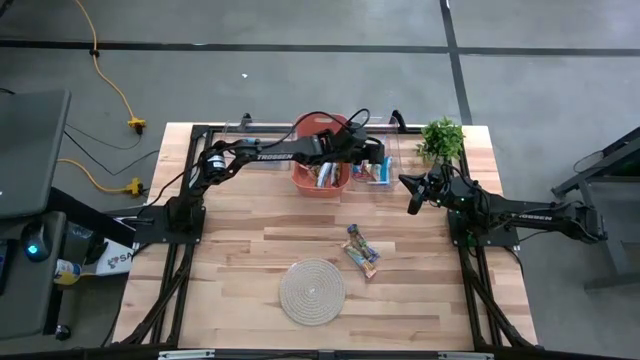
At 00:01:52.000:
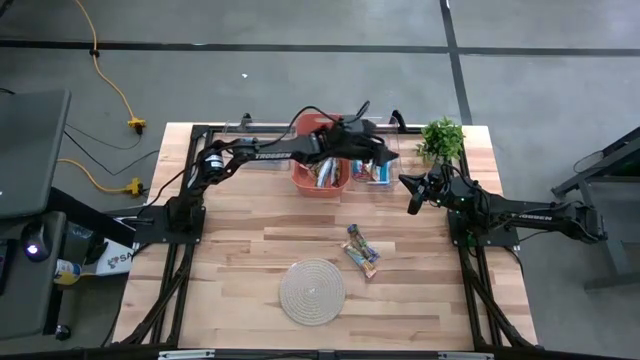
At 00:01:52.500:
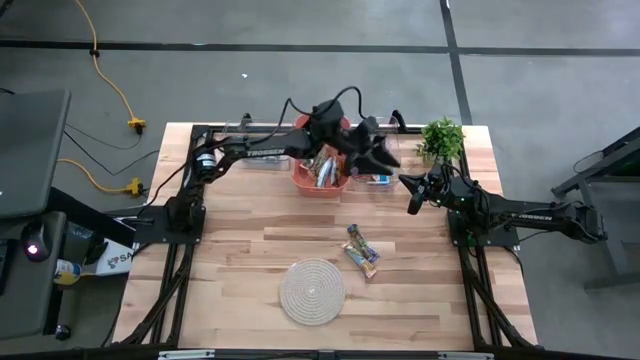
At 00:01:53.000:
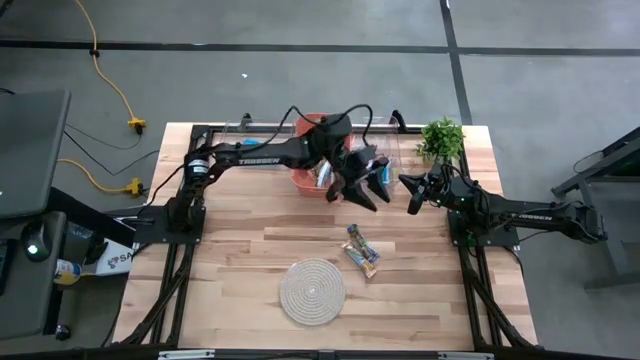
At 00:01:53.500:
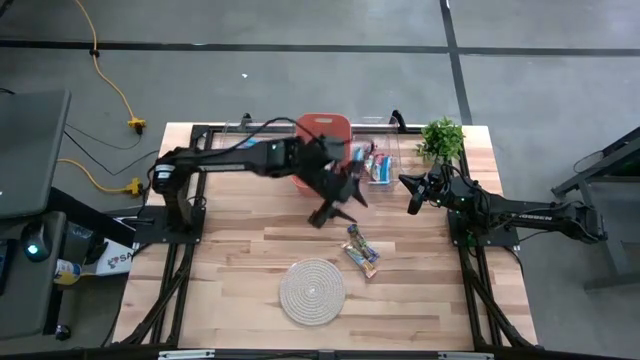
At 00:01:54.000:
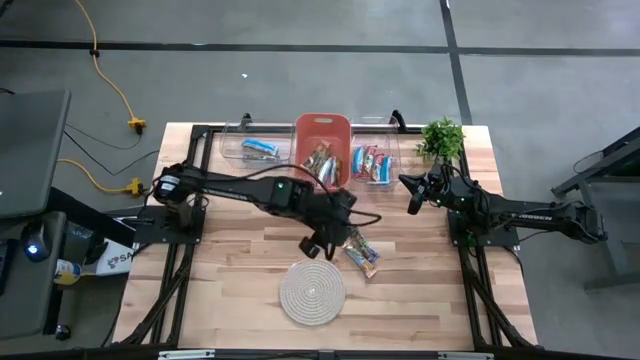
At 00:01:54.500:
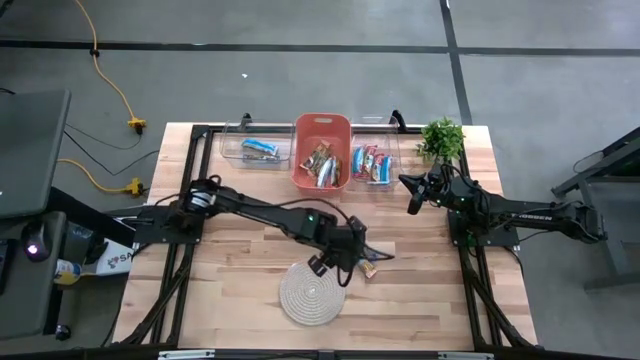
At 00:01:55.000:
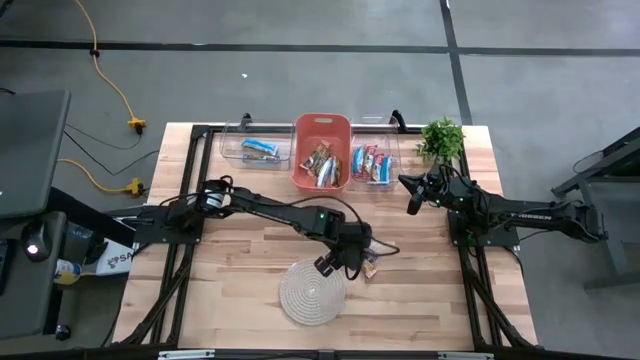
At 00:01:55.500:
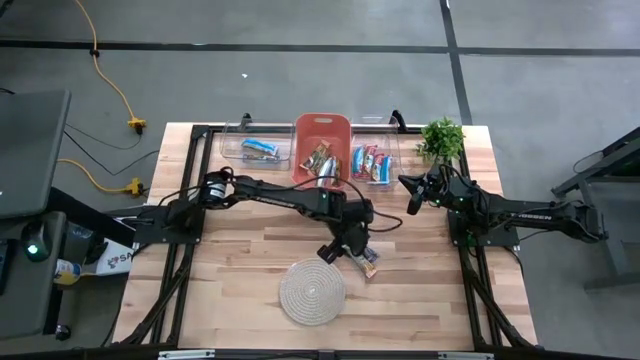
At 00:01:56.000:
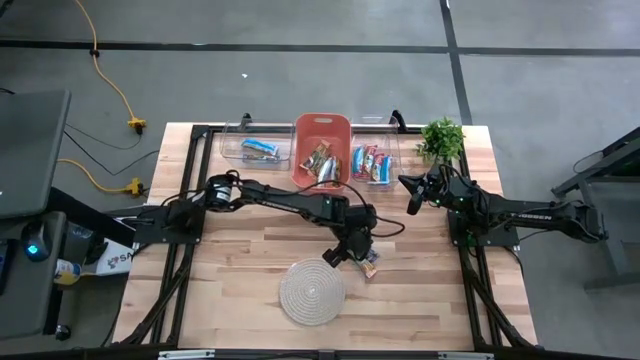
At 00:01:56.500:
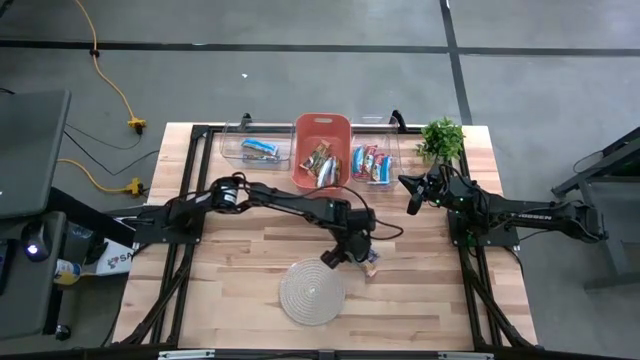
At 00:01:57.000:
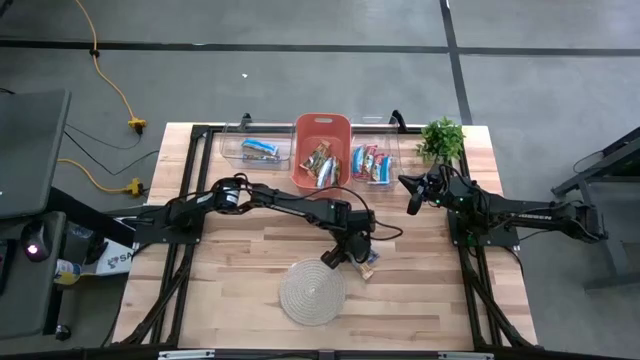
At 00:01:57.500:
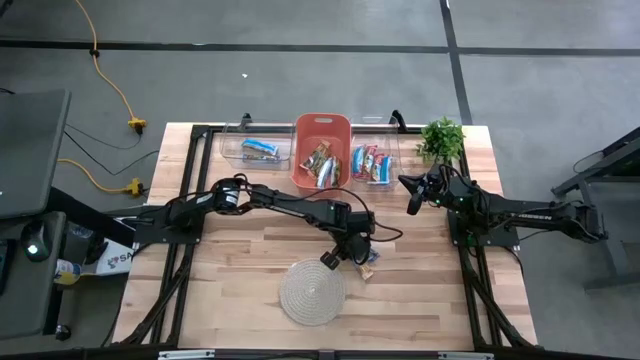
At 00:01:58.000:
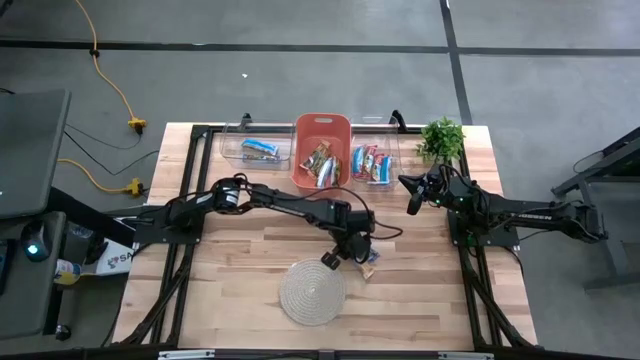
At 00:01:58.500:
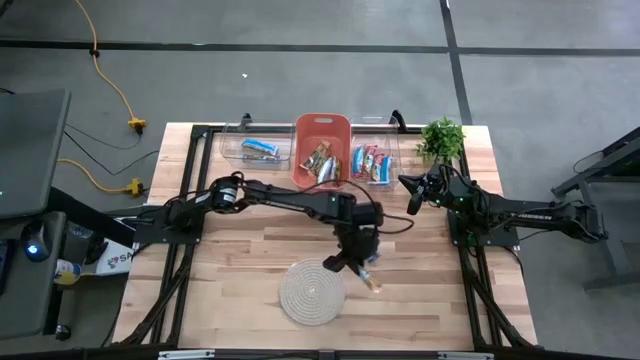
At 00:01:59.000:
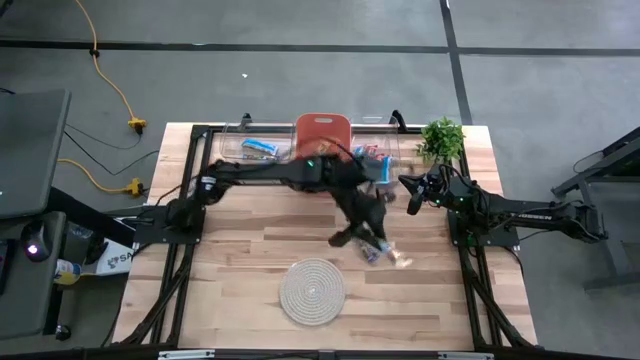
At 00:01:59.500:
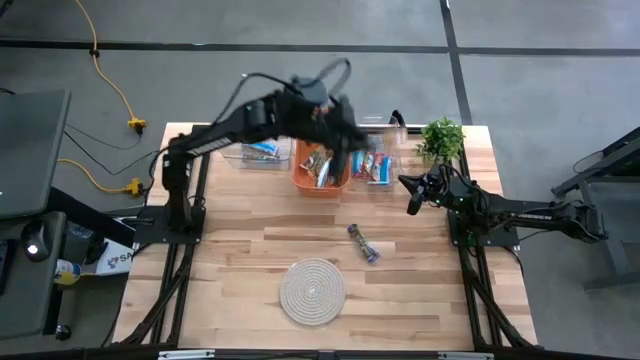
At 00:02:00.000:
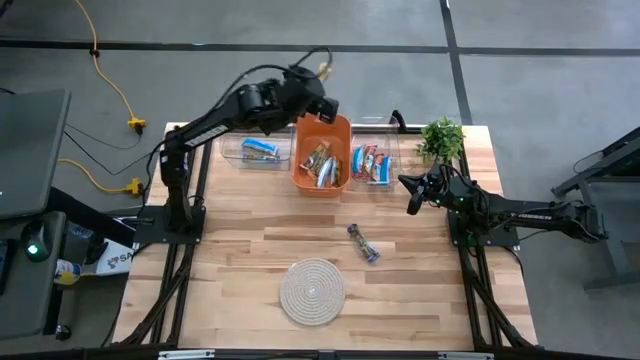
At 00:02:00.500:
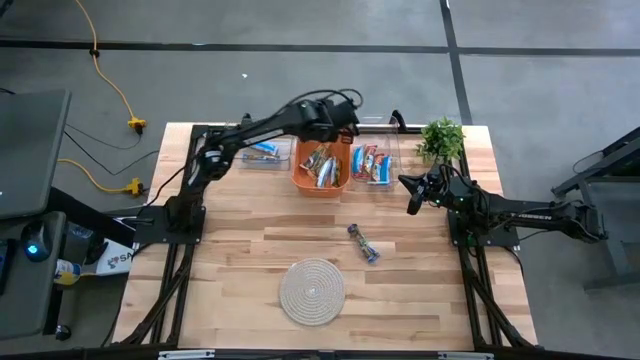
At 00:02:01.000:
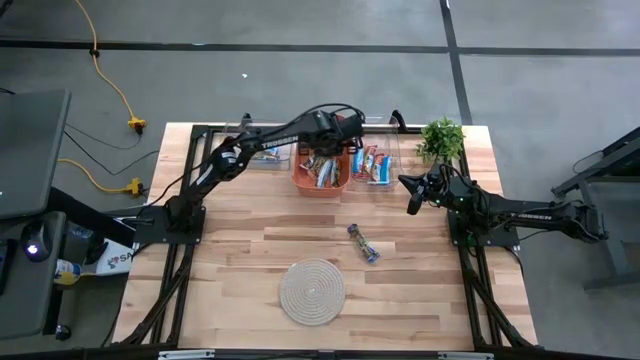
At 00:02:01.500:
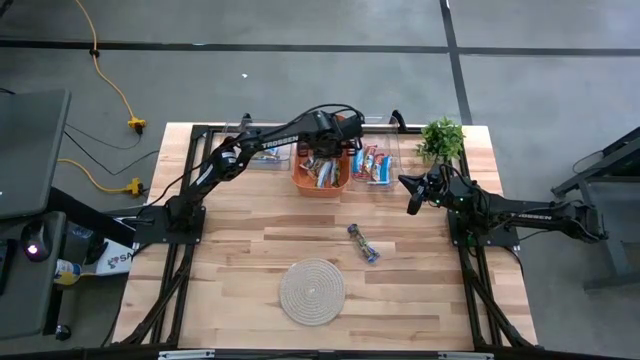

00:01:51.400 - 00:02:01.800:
Task: Pick and place Granola Bars by type
Put the yellow granola bar into the orange bin

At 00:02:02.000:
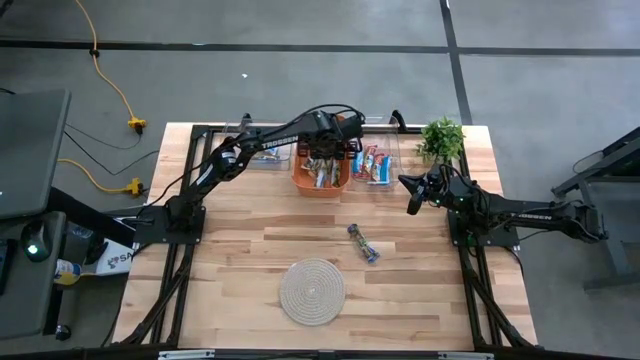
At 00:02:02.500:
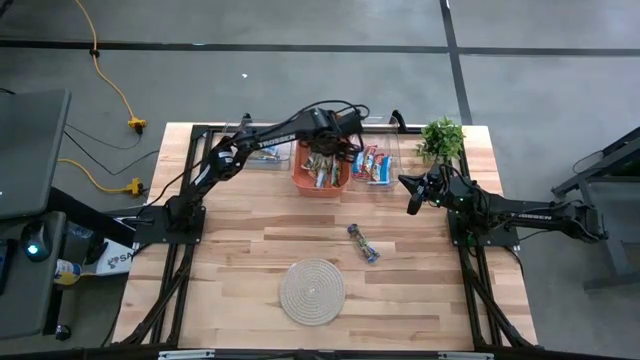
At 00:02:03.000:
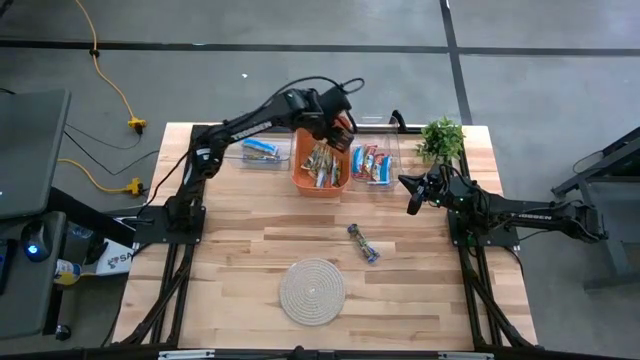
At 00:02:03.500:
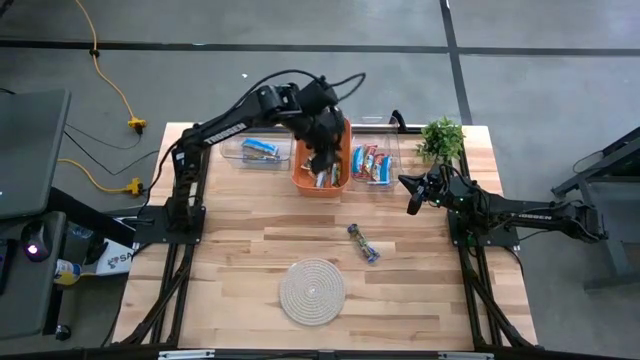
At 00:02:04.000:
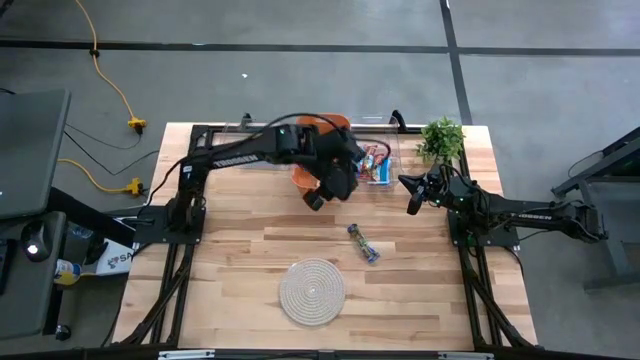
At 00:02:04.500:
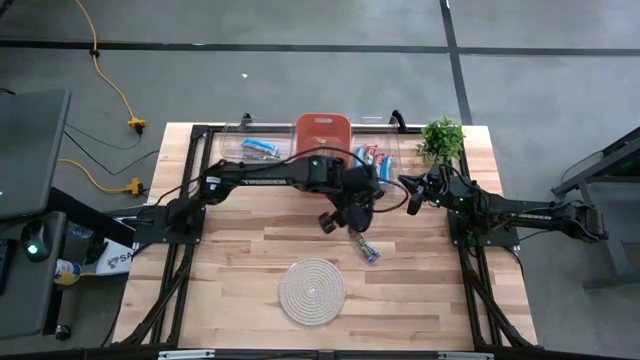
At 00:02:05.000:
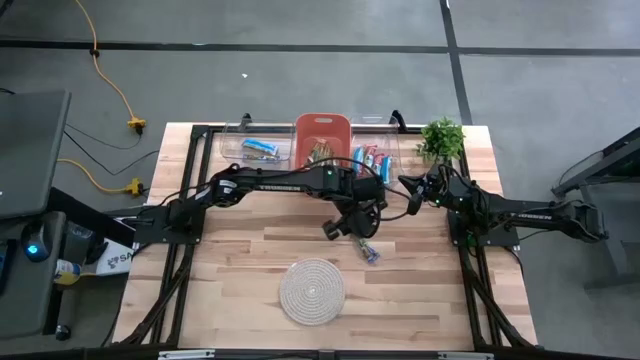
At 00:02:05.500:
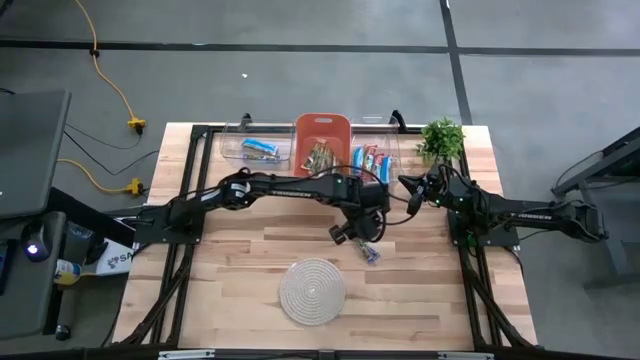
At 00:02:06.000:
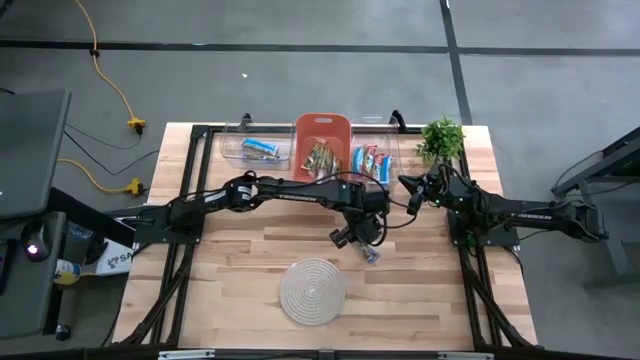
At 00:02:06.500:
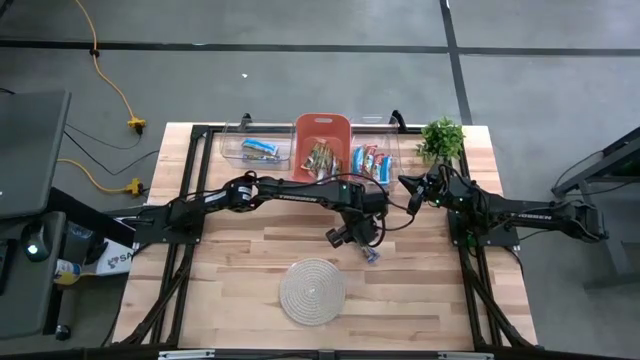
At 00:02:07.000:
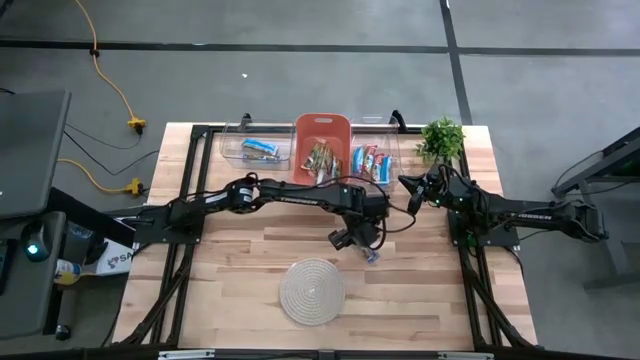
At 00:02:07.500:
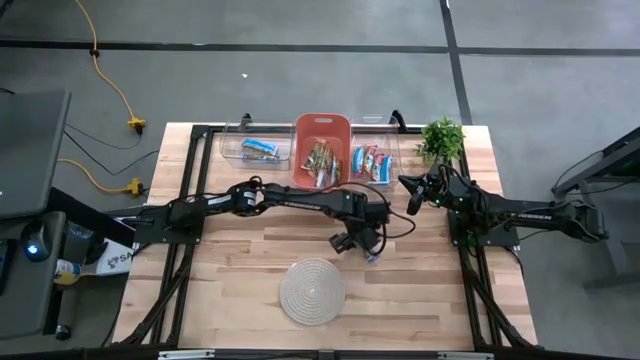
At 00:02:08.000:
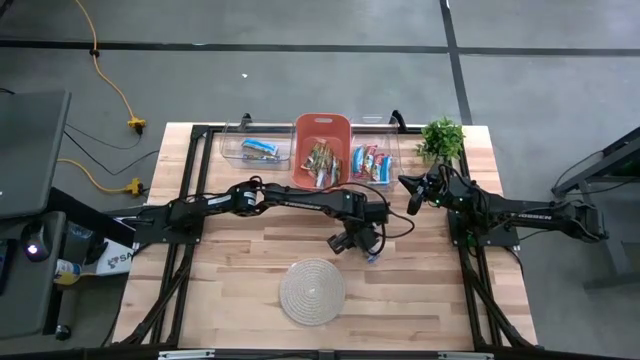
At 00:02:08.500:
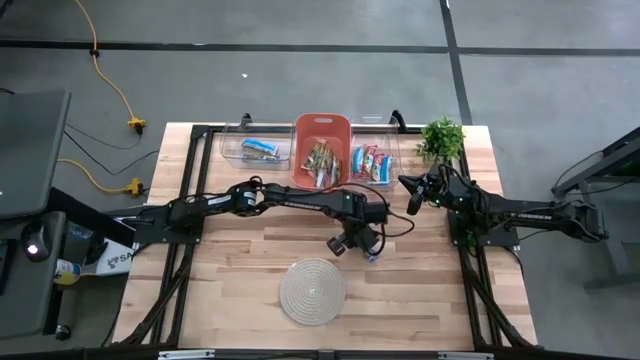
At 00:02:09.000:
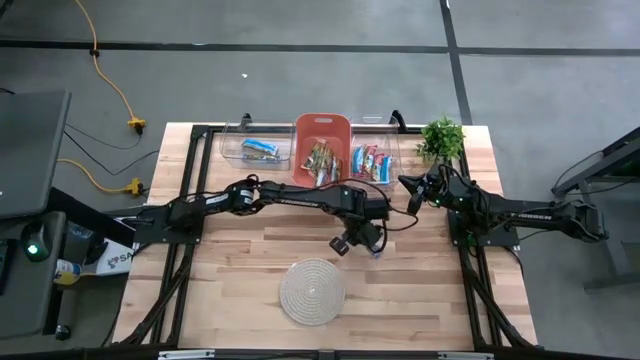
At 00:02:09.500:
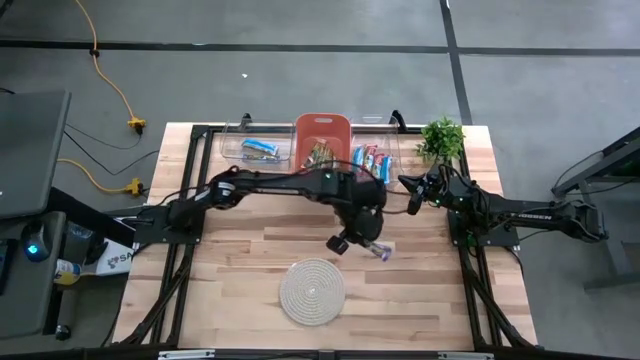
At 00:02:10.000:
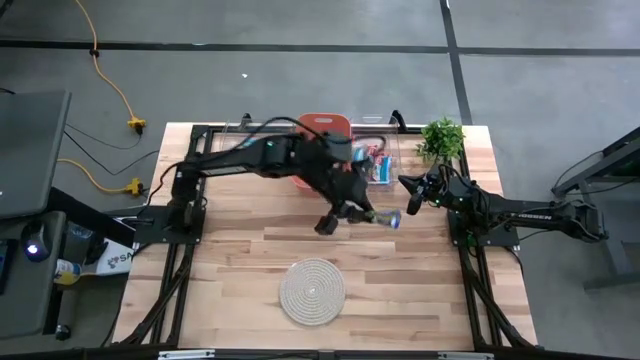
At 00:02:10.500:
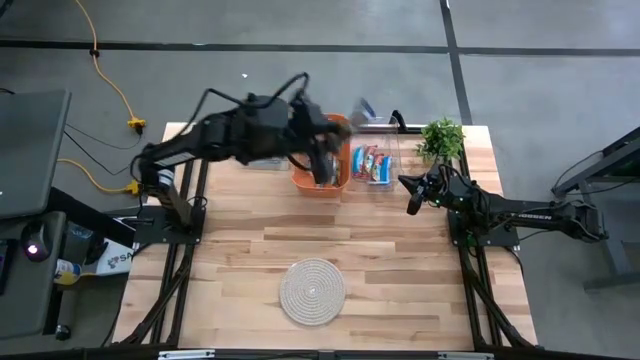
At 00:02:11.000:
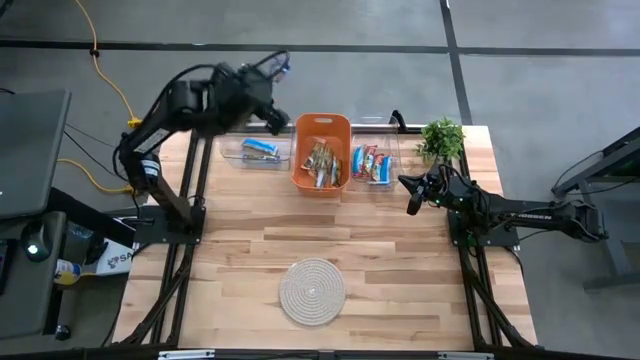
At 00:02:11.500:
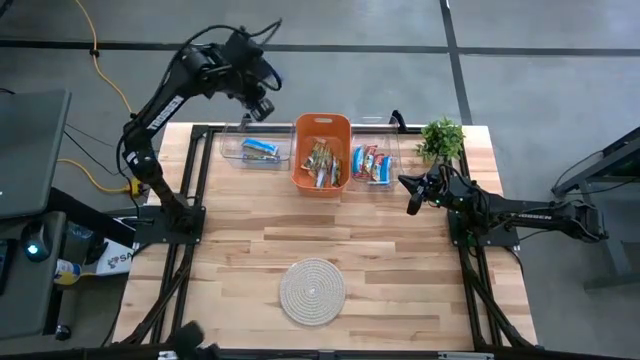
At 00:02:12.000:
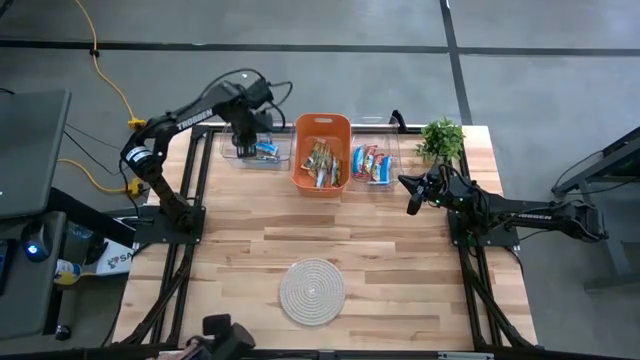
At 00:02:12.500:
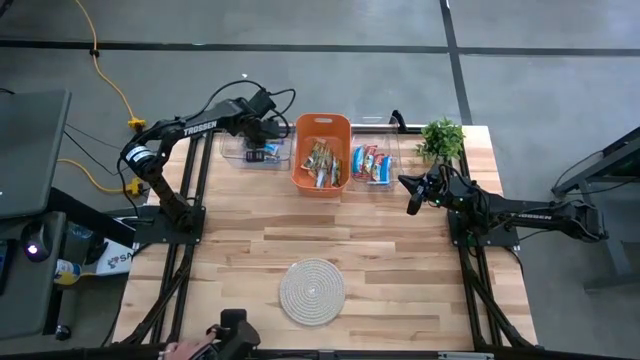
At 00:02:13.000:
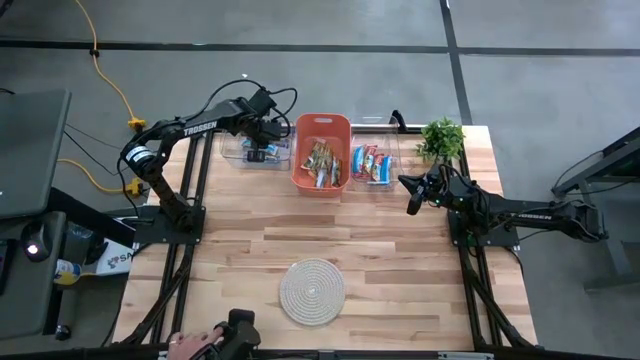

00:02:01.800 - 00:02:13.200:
Put the blue granola bar into the left transparent bin
